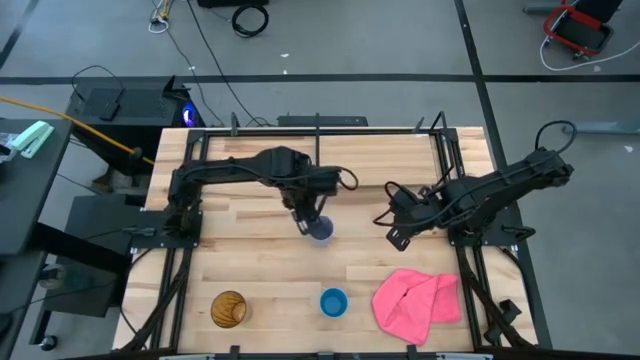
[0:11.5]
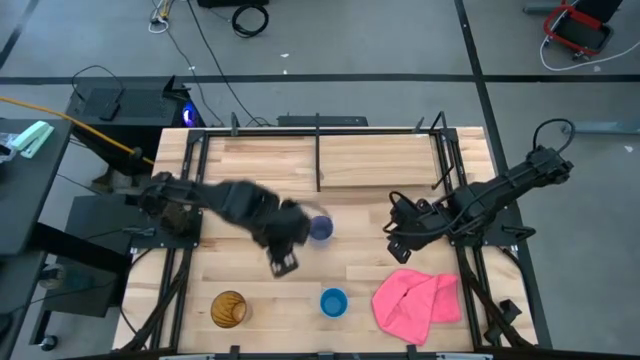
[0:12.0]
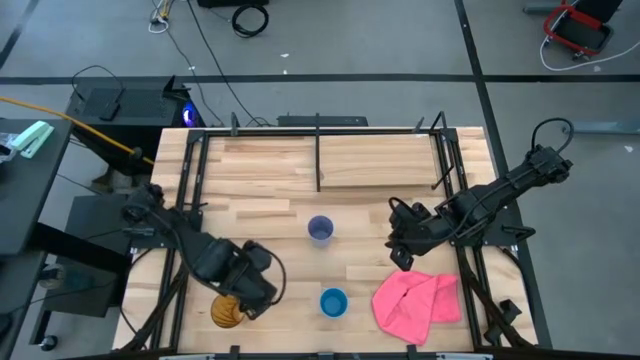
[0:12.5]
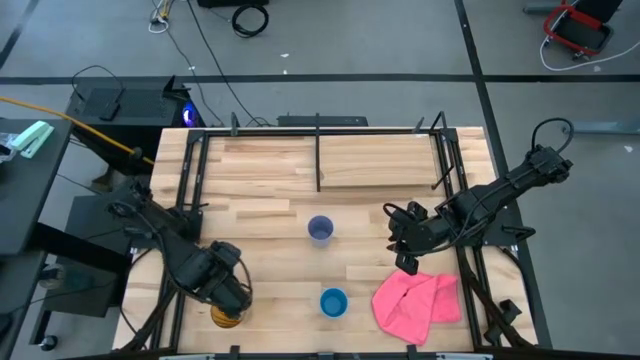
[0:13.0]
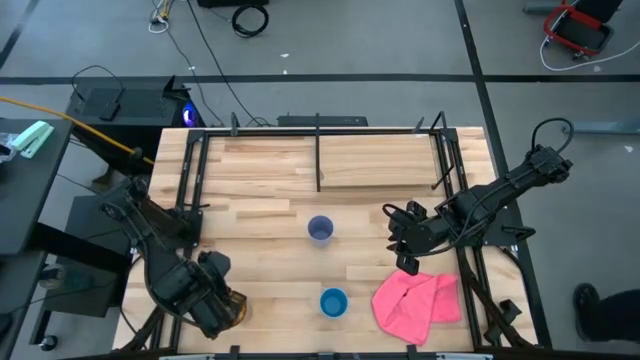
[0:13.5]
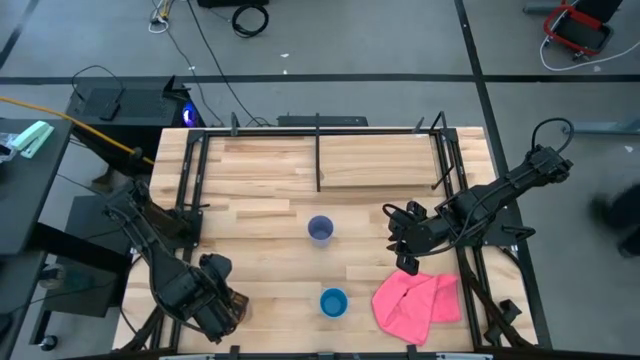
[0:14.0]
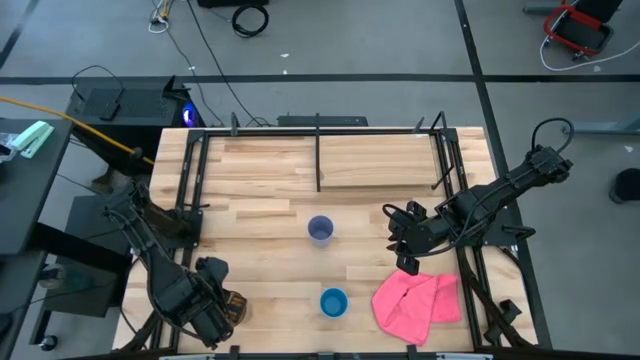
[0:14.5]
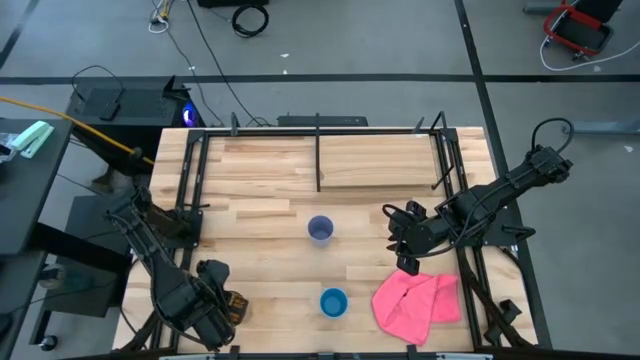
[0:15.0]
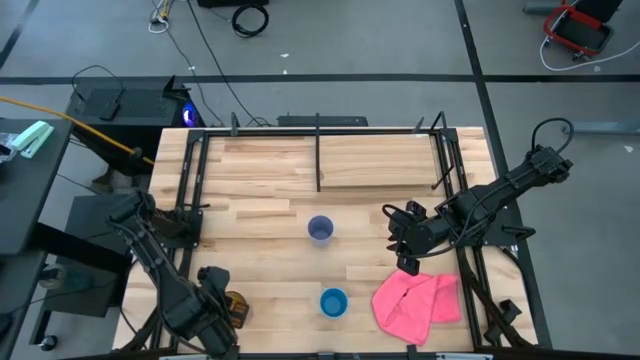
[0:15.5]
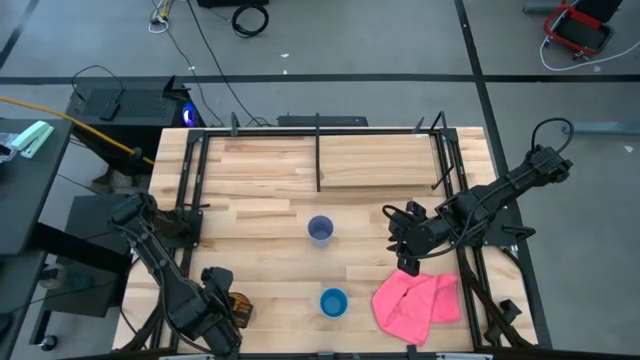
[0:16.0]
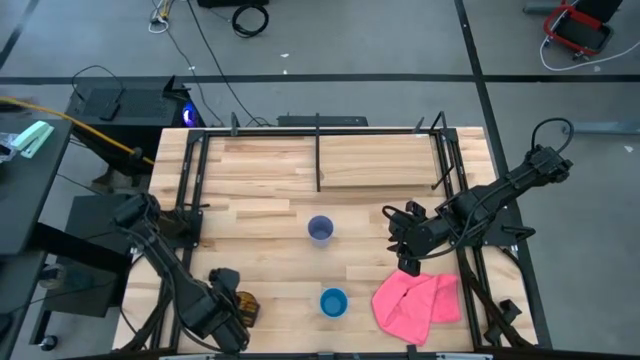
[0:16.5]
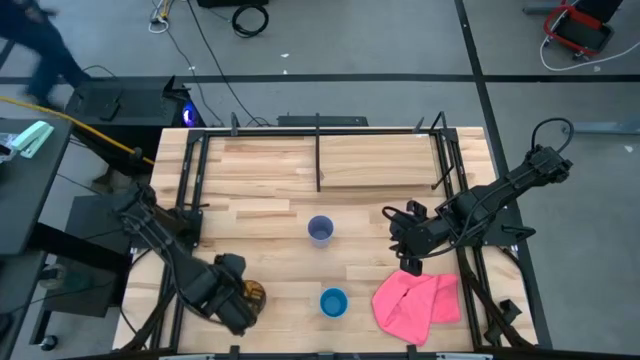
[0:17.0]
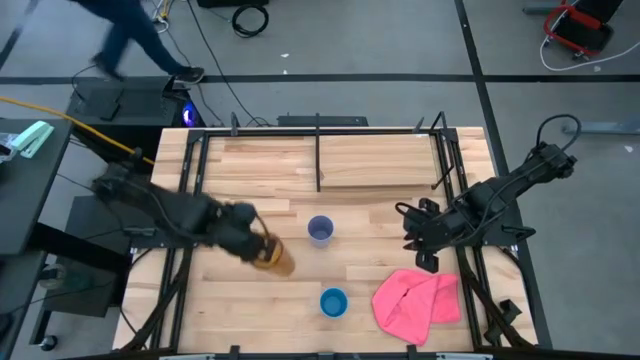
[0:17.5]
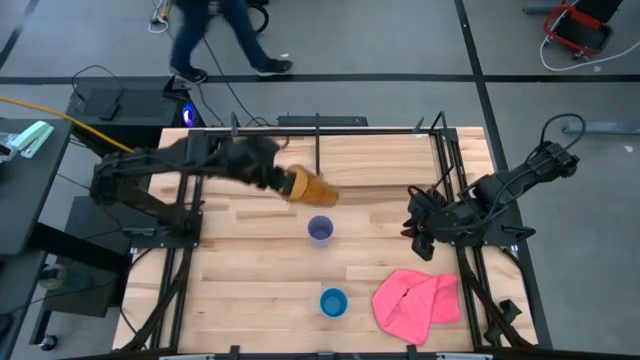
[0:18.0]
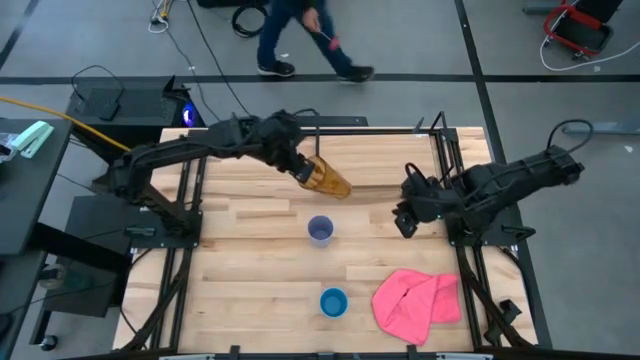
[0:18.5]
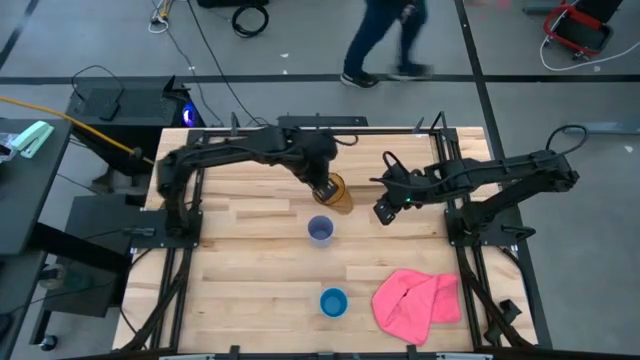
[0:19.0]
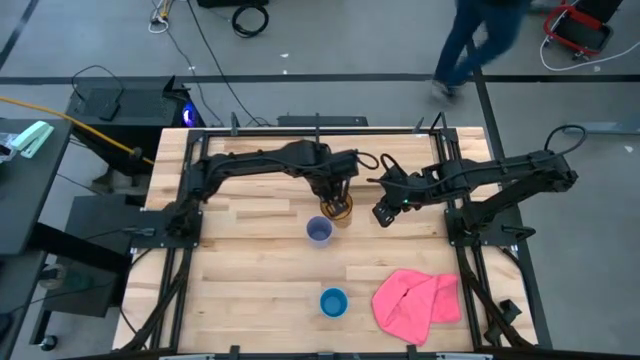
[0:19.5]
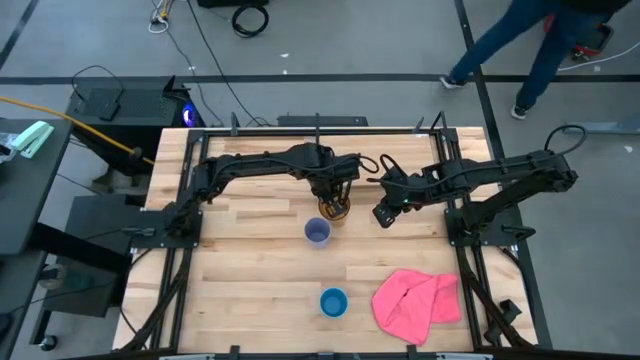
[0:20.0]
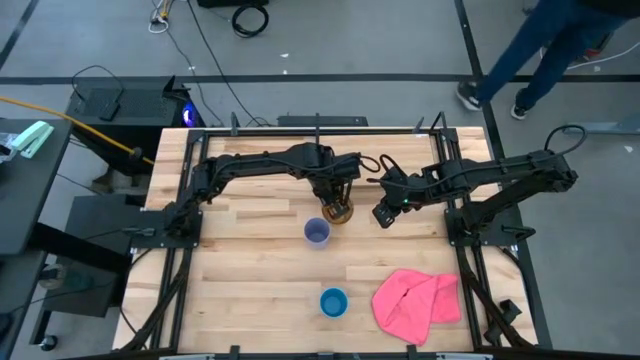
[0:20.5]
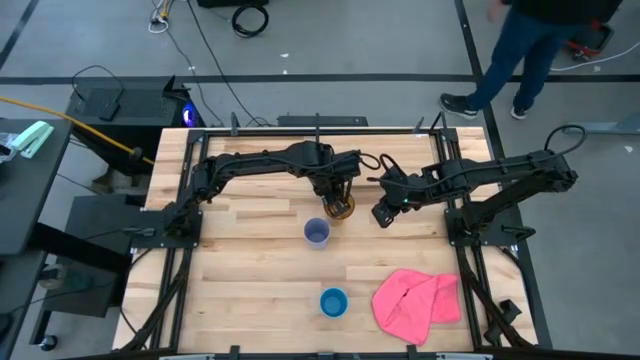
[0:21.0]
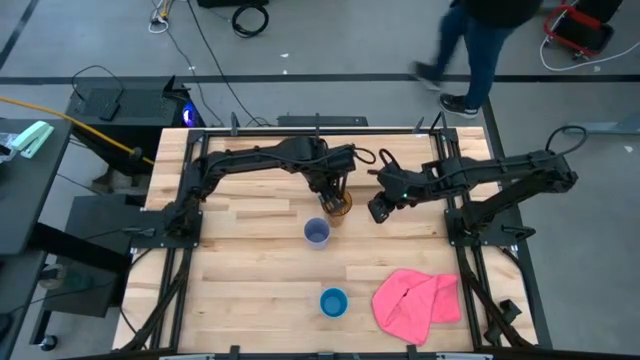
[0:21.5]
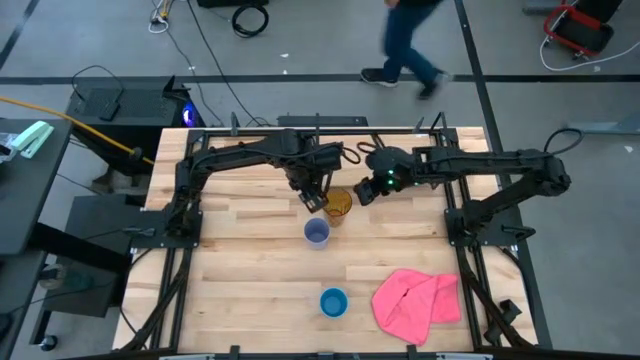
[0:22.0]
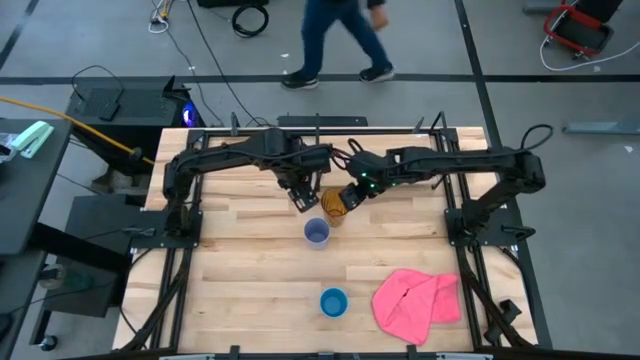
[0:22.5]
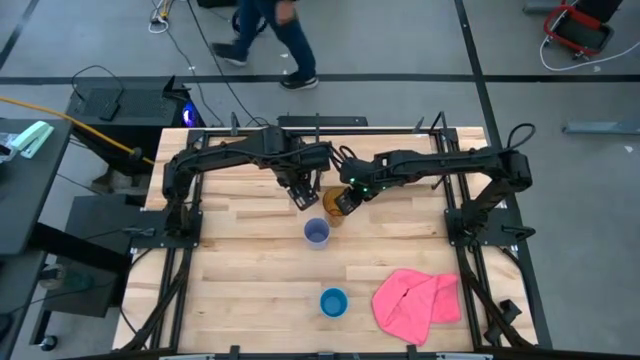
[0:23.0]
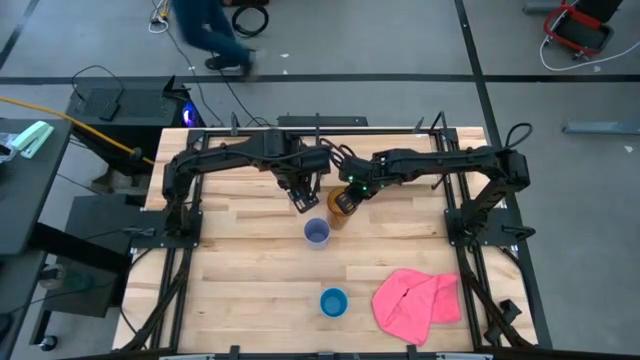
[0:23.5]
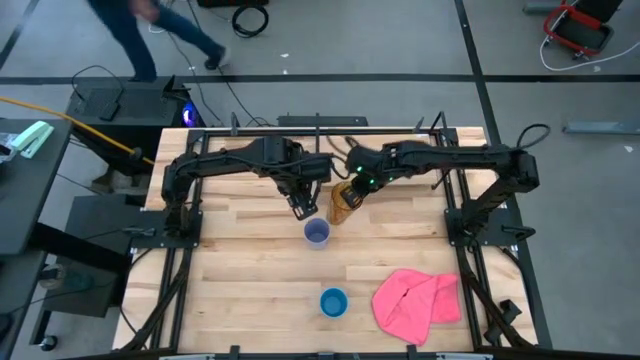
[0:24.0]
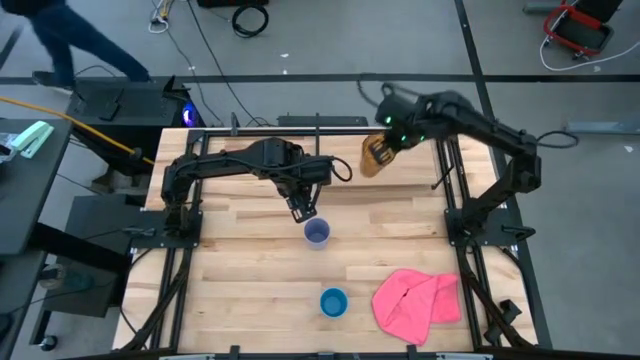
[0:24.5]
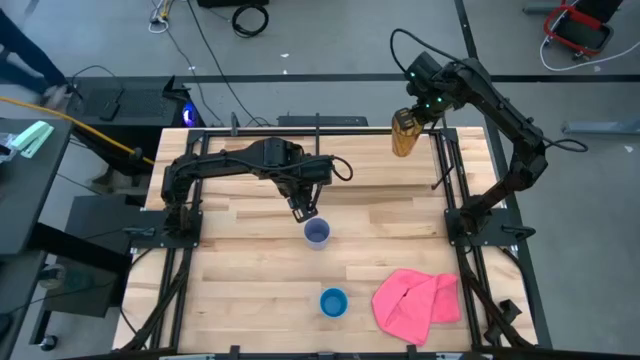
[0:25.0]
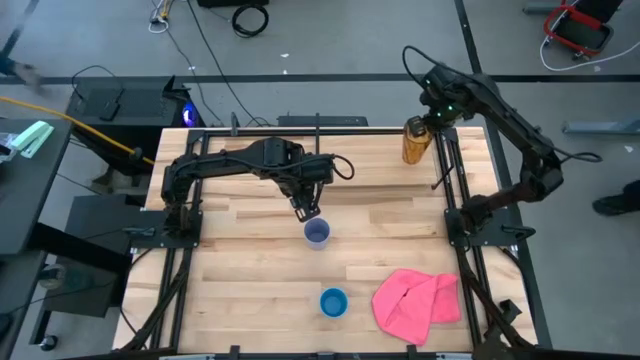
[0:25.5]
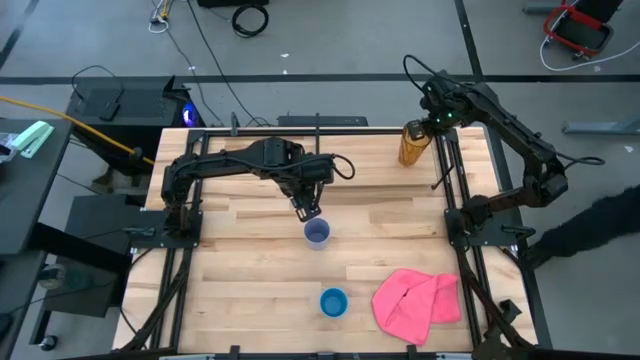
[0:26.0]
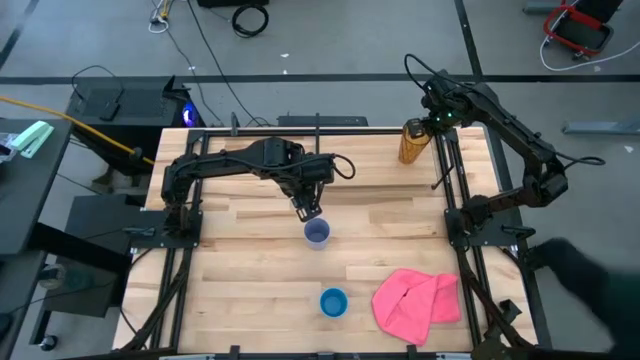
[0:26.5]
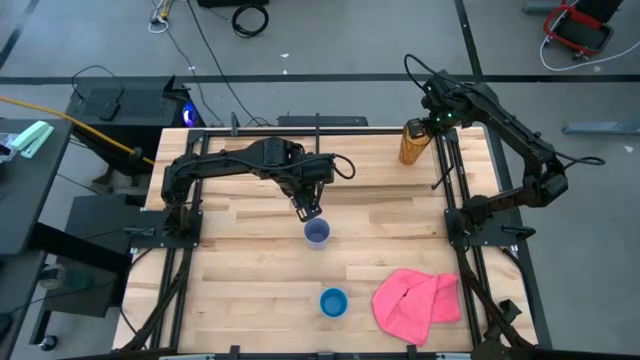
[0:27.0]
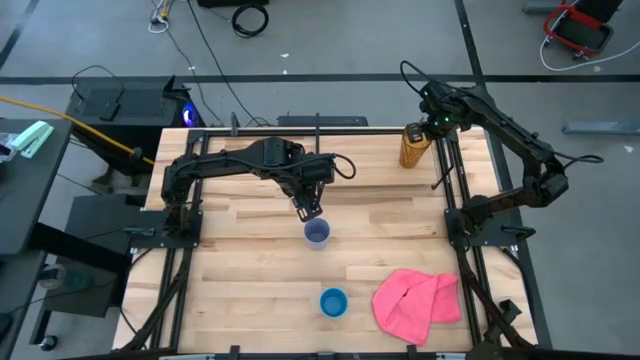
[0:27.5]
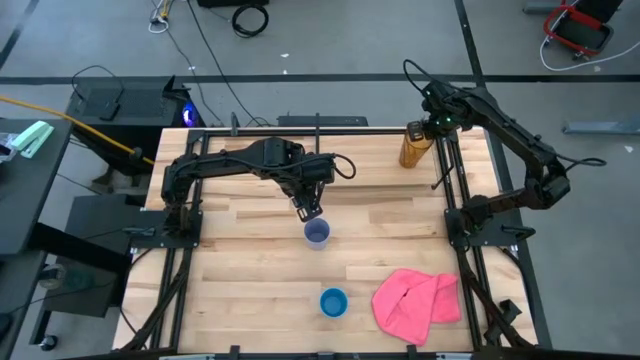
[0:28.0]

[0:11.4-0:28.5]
Task: Stack small to large cups/mugs on shelf
Put the brown cup on the shelf

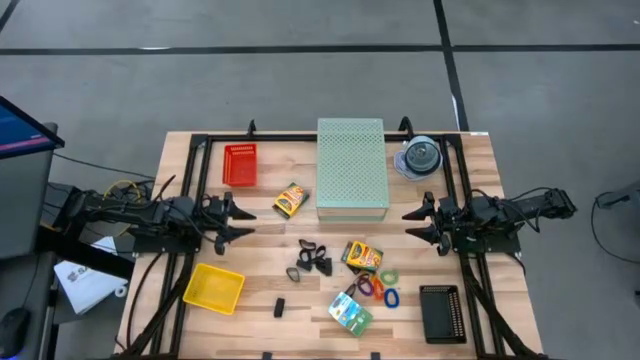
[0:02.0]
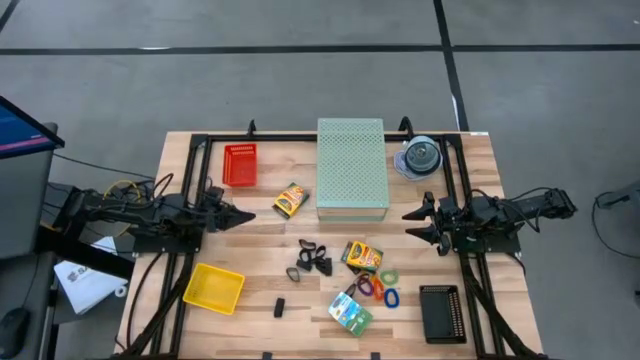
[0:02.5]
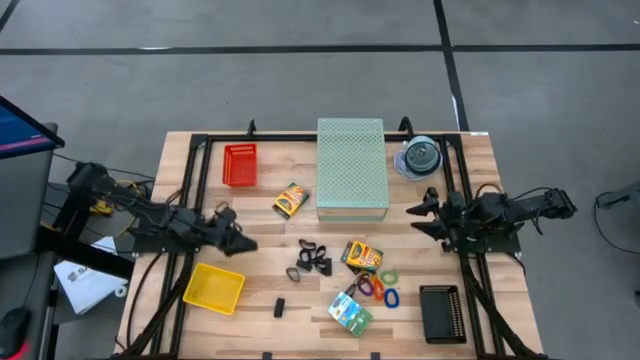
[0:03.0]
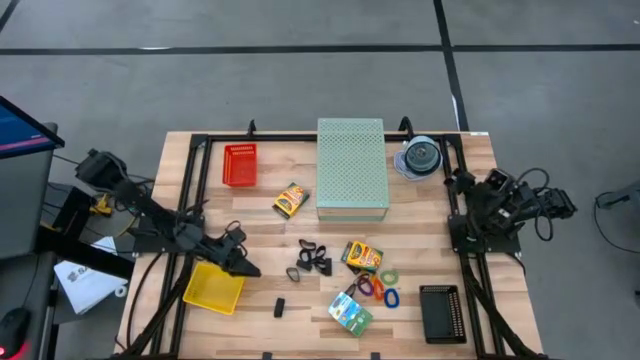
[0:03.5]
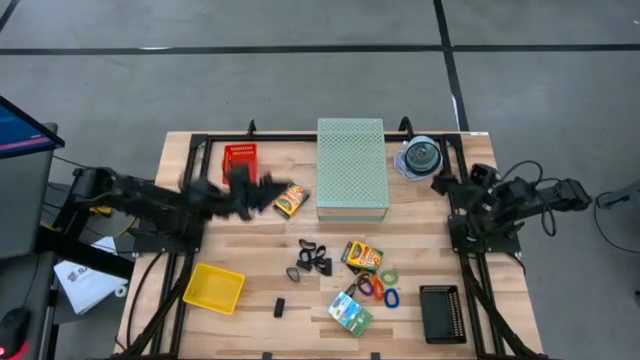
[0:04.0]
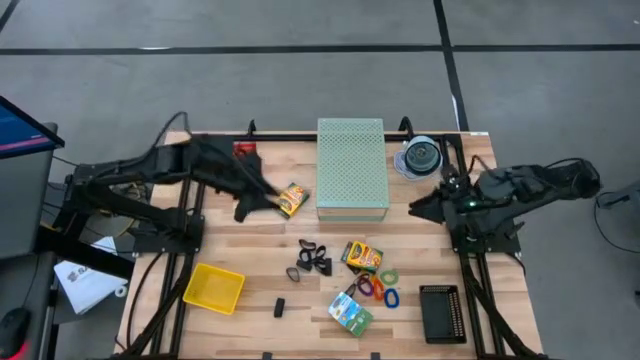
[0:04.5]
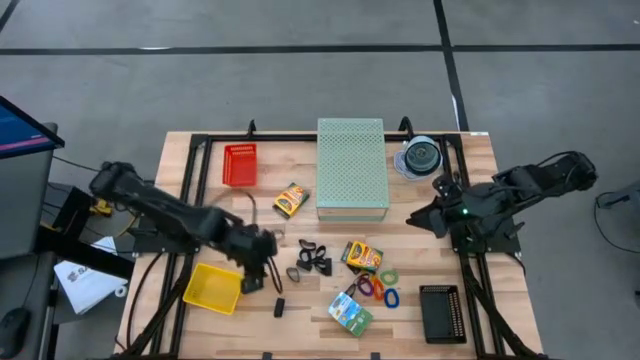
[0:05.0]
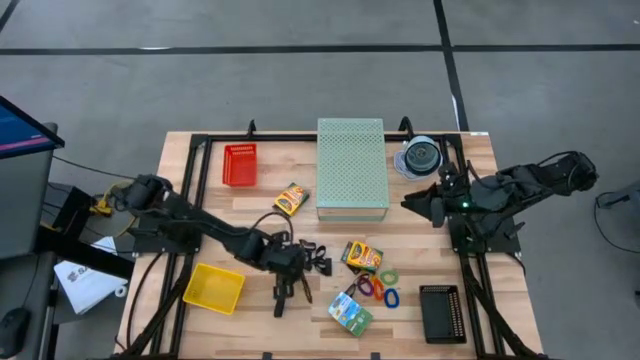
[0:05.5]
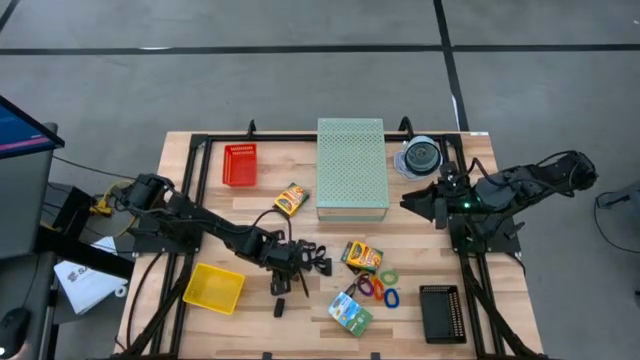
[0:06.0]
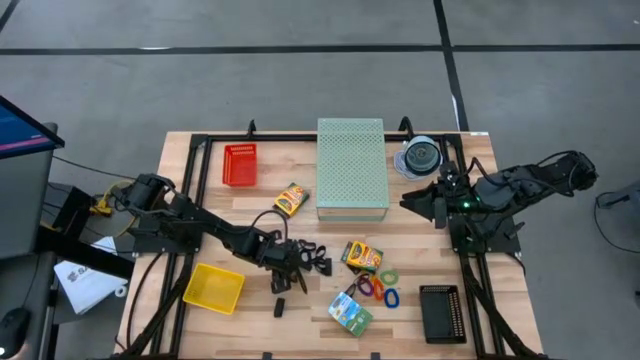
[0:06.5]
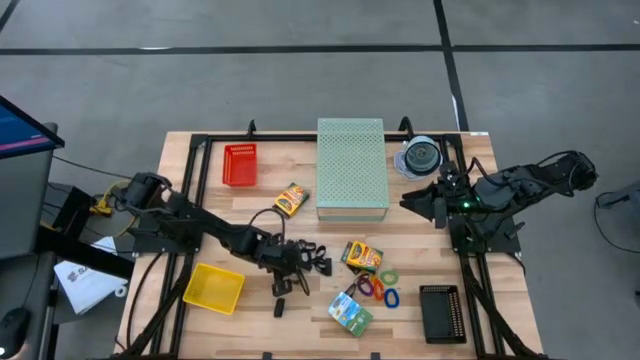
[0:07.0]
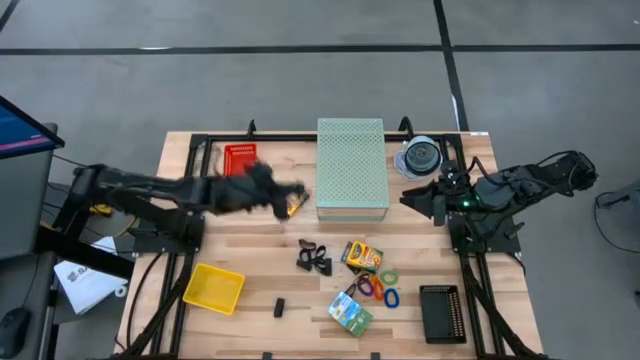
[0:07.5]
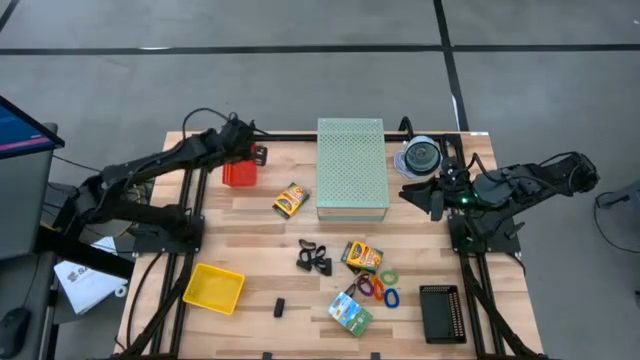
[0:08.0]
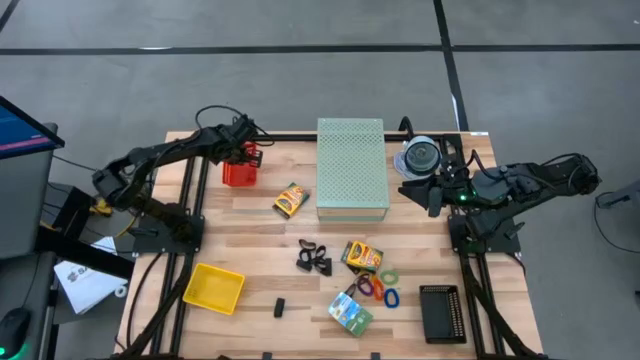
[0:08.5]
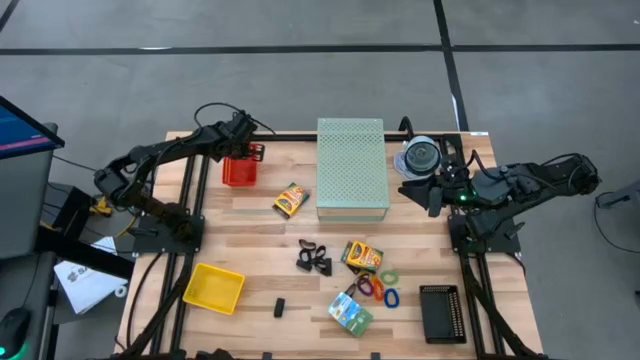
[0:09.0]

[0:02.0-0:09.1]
Task: Pick & Place Office Desk Supplies
Put the black rubber band into the red bin
